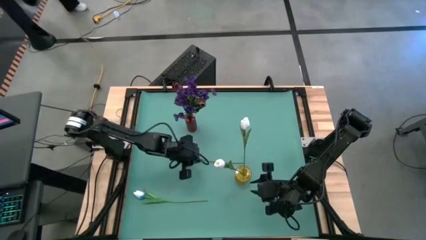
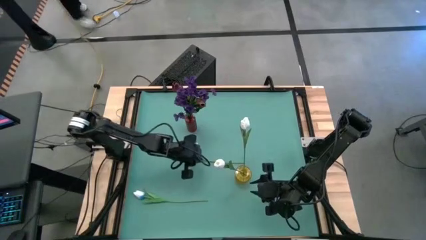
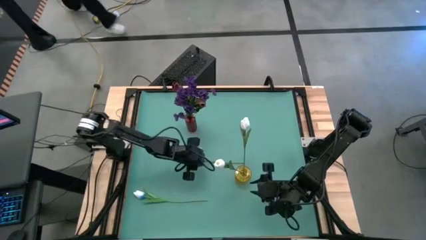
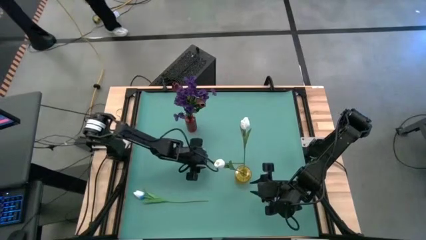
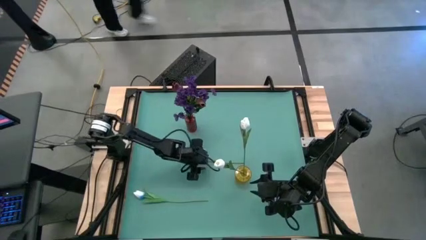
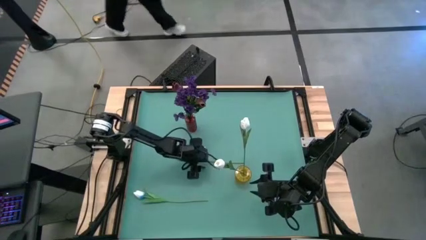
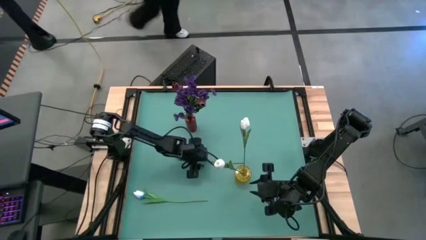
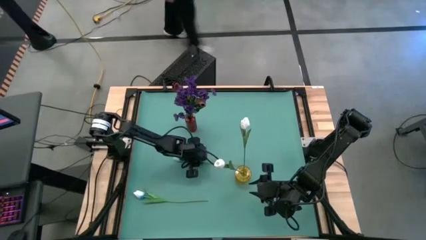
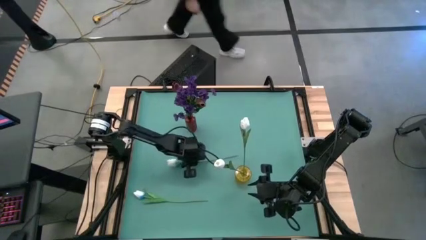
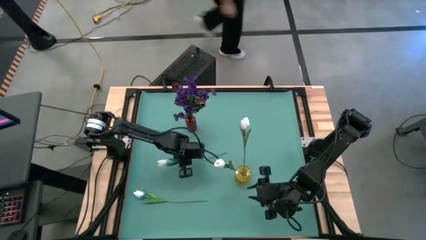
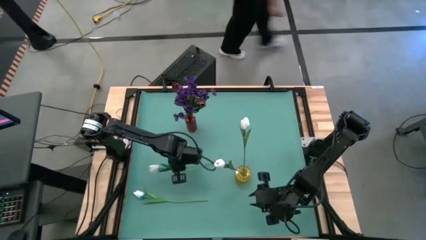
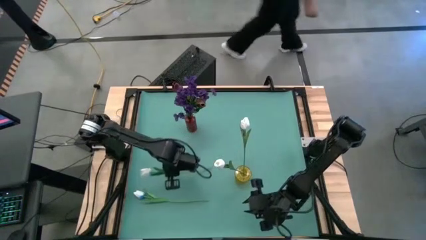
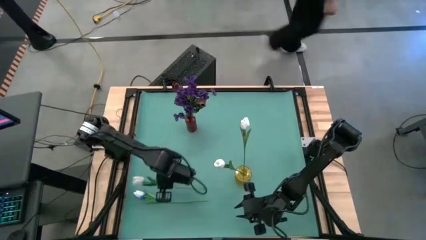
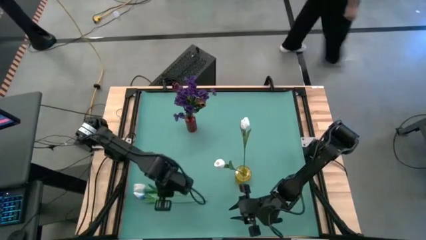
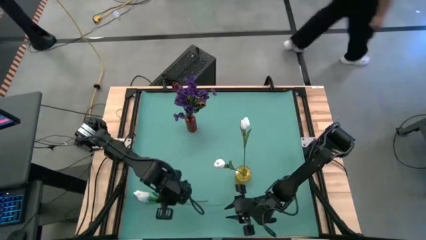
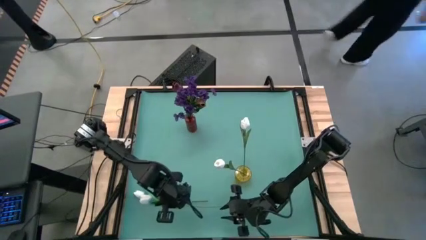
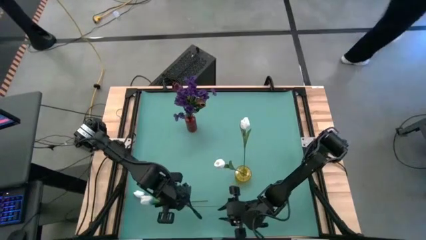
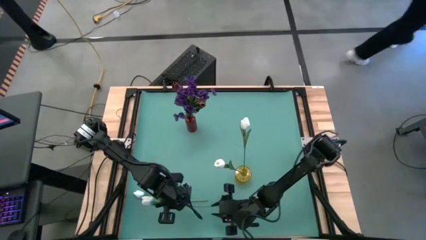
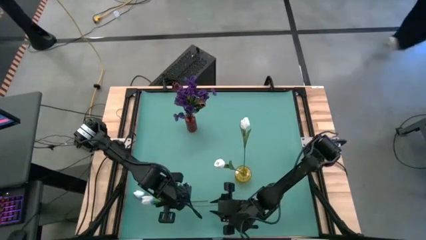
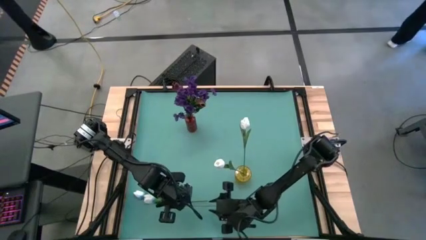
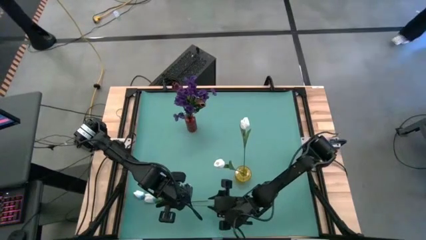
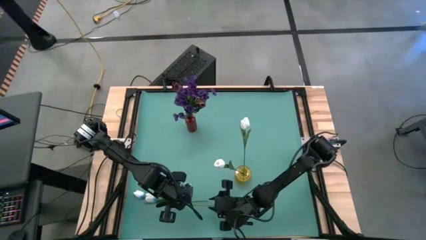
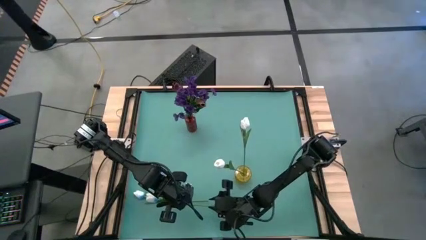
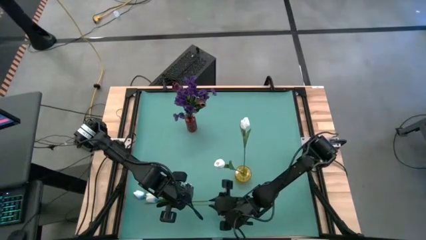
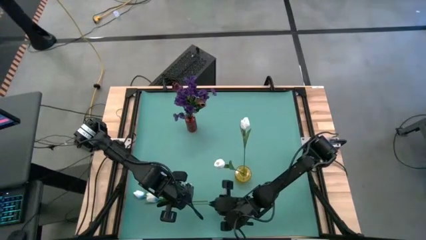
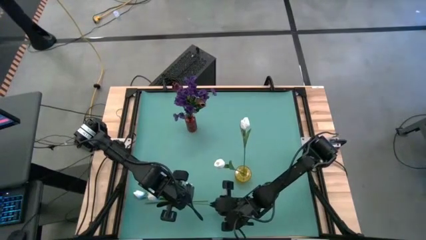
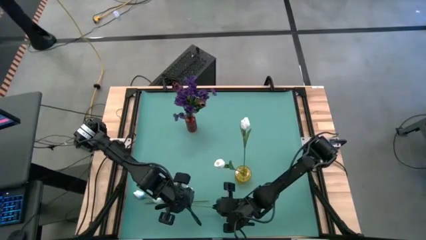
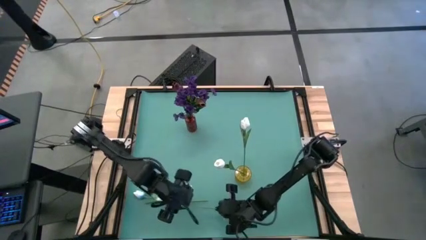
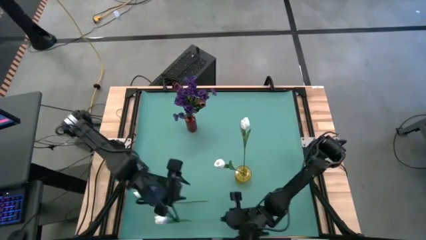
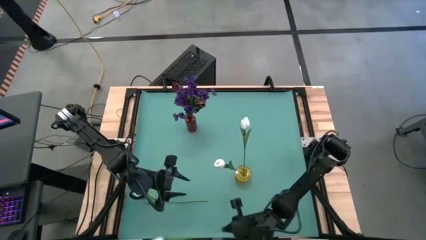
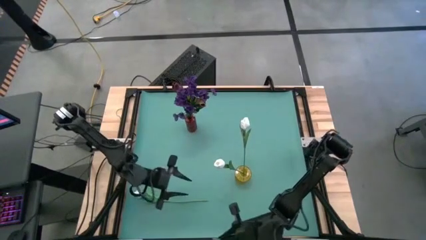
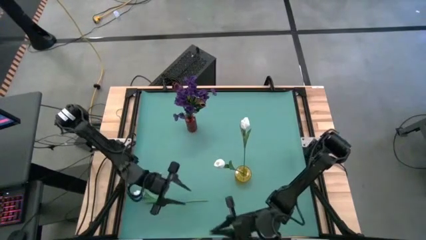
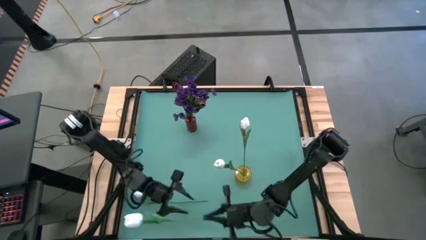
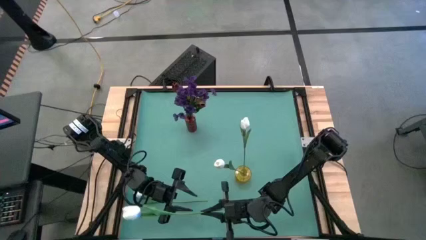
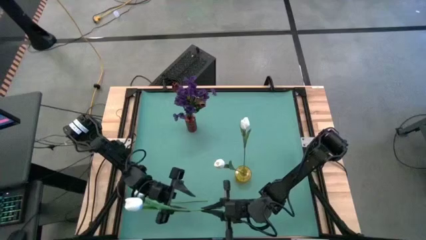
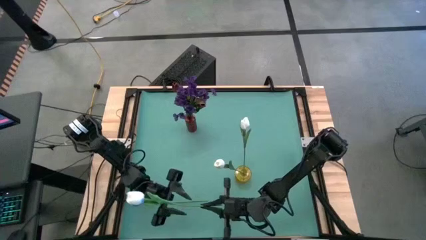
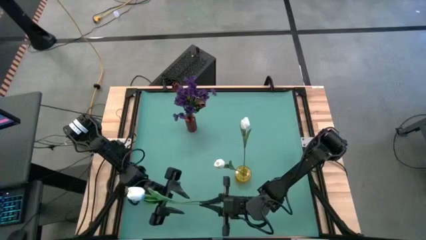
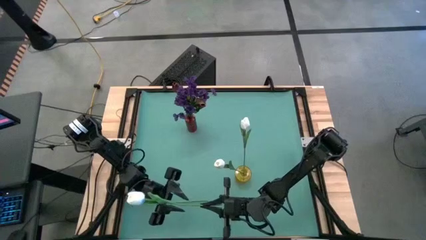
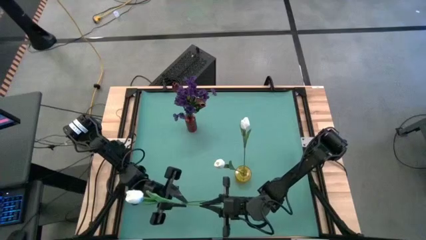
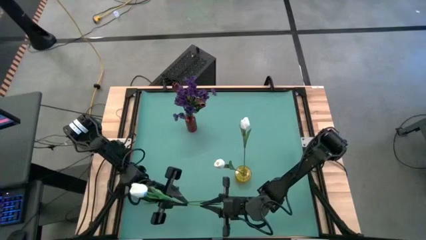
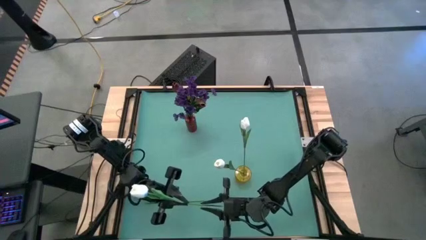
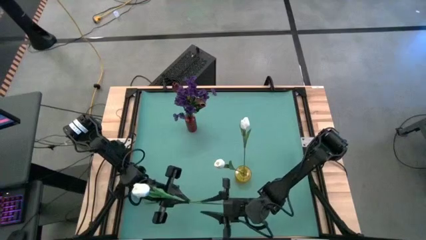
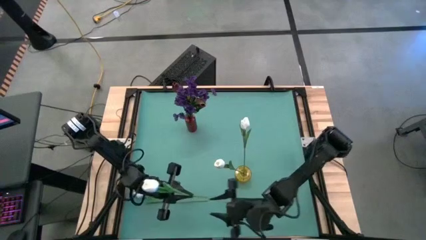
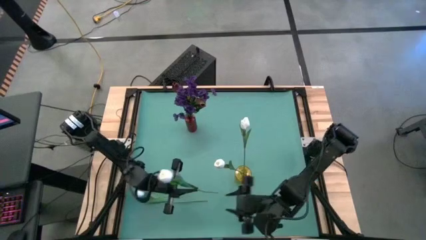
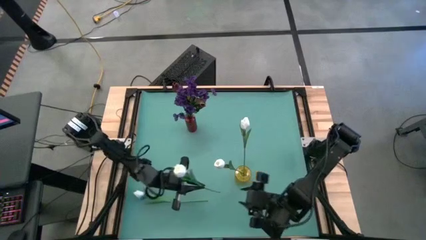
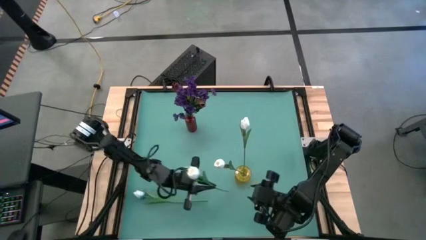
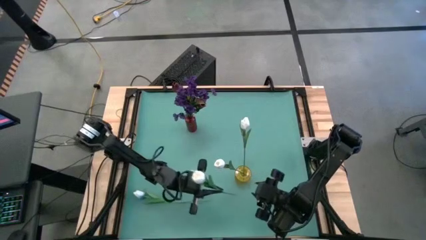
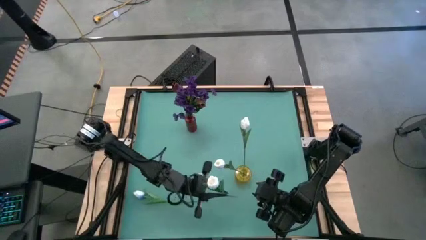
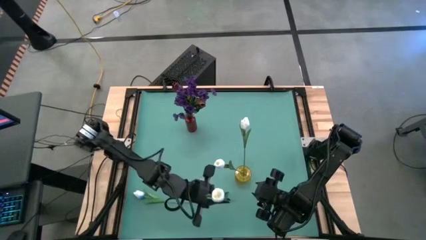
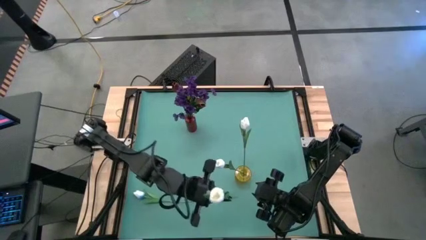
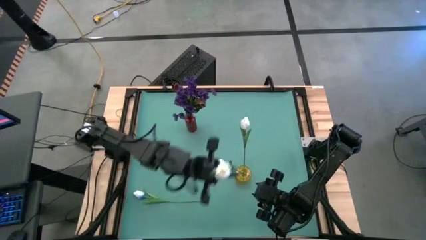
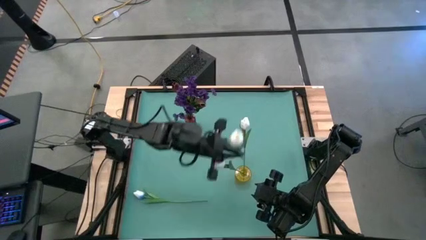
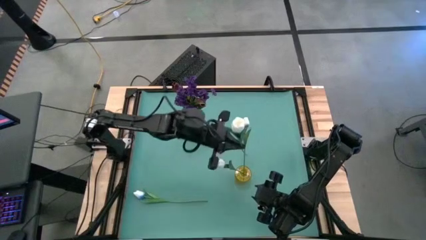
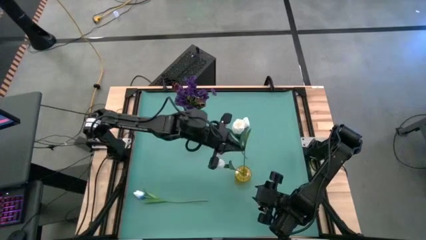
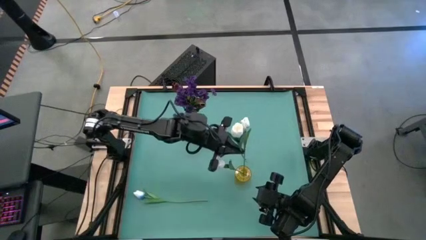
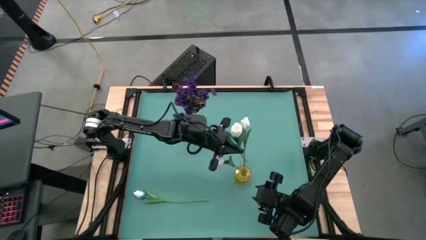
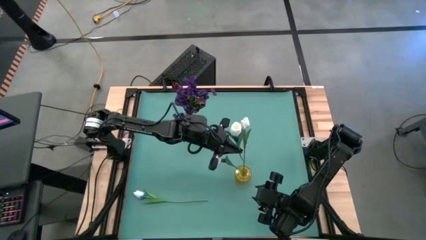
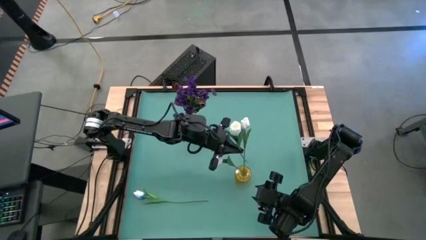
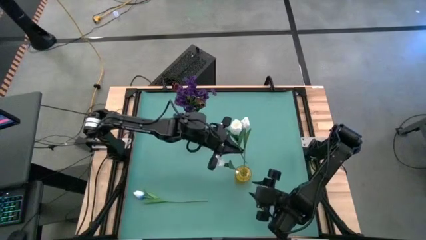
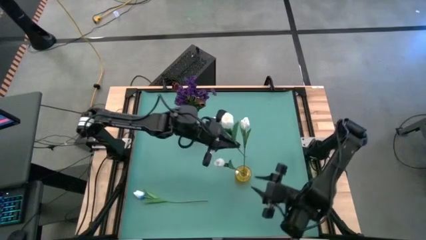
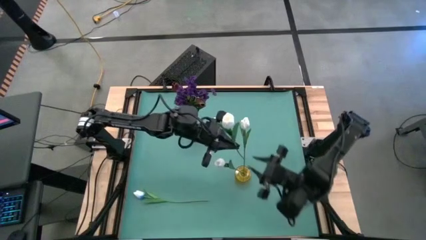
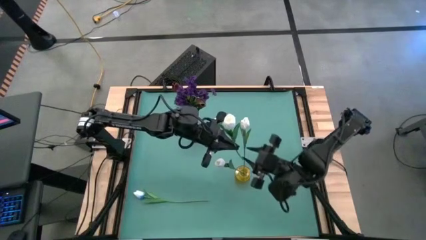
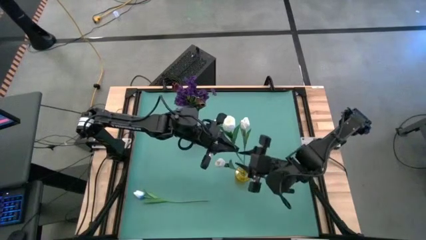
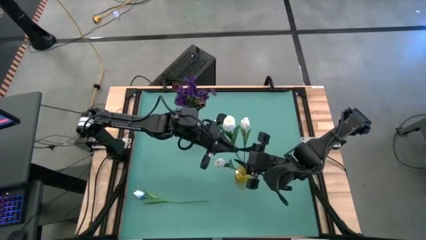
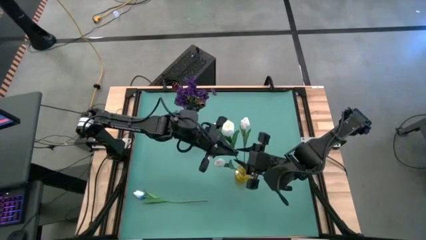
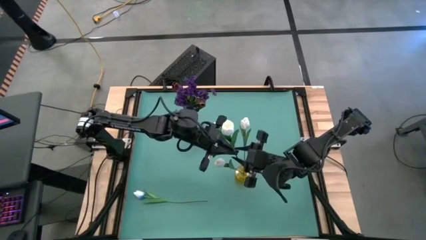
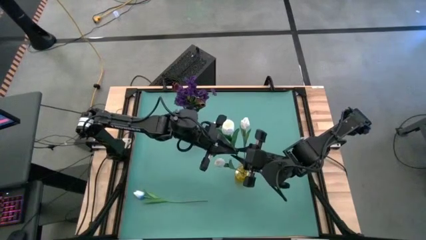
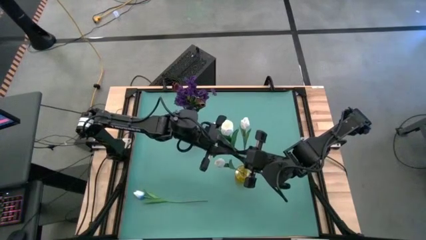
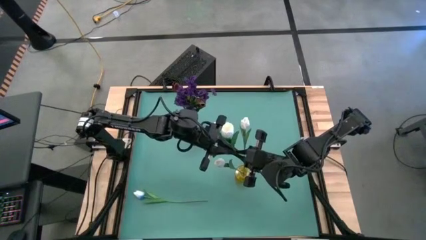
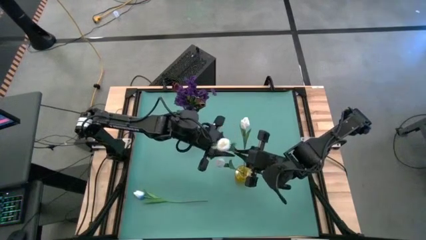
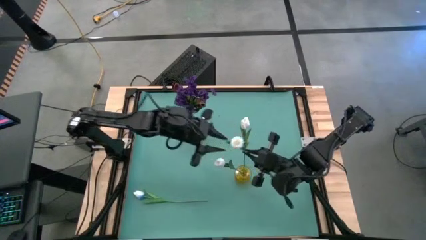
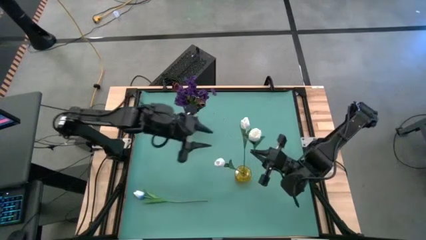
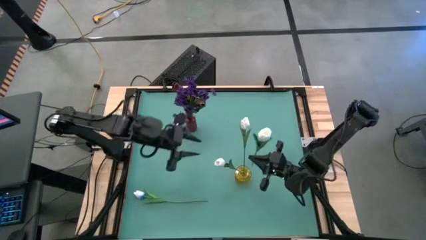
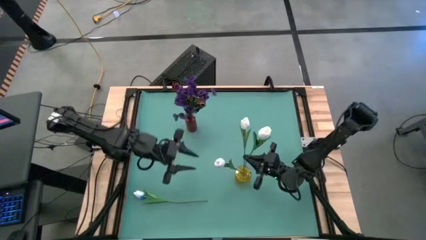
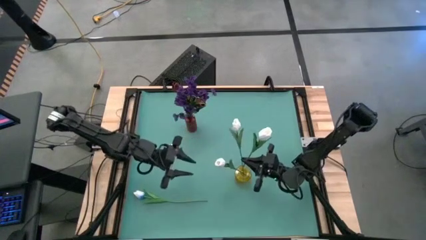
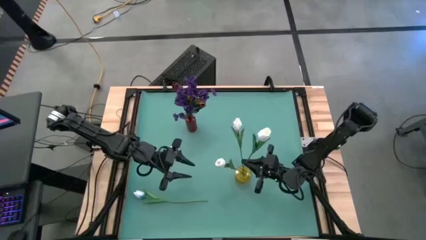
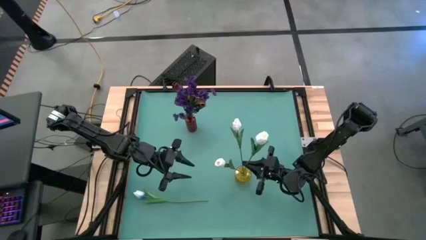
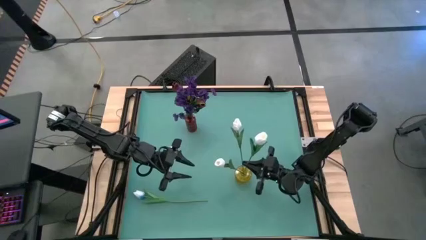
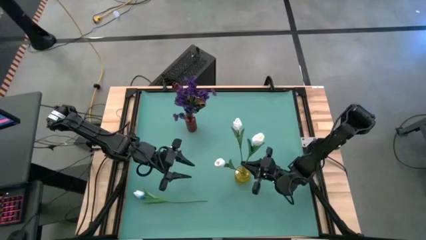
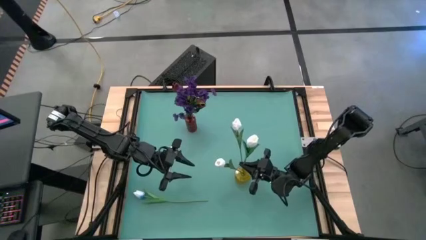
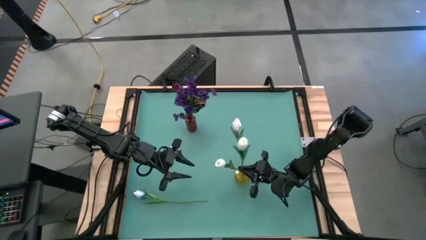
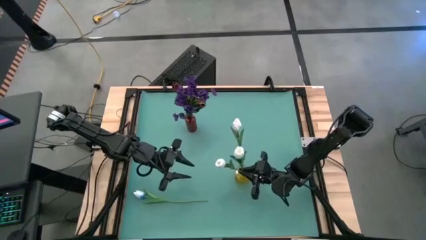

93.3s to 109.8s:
Task: Sort flowers into vase by color
Put the top white-blue flower into the yellow flower vase
